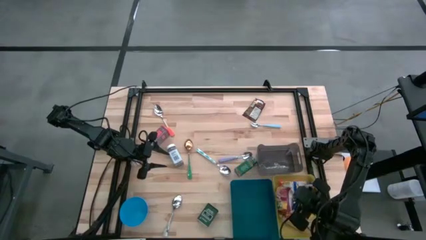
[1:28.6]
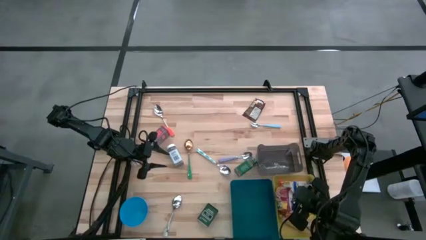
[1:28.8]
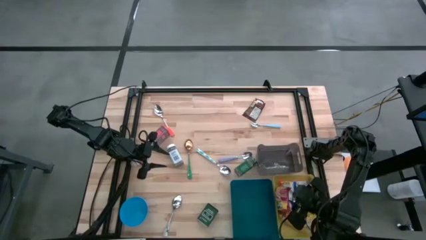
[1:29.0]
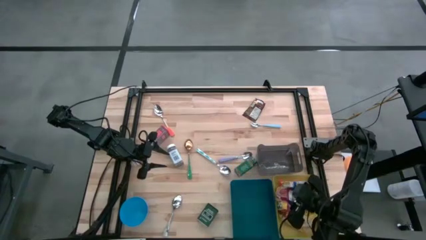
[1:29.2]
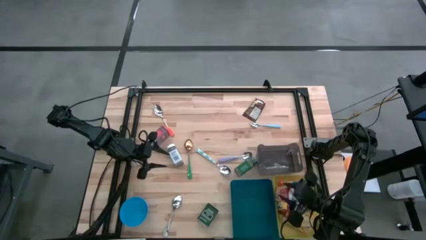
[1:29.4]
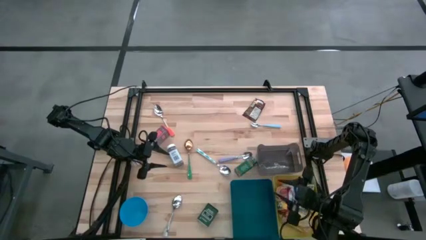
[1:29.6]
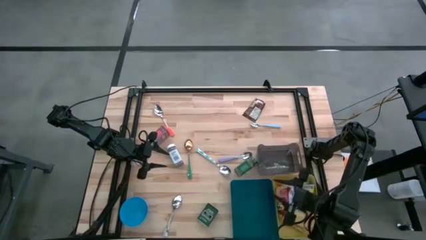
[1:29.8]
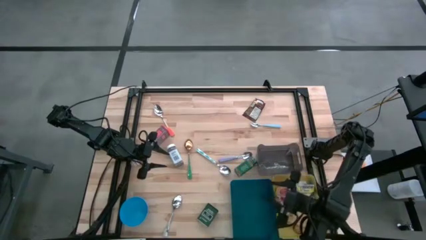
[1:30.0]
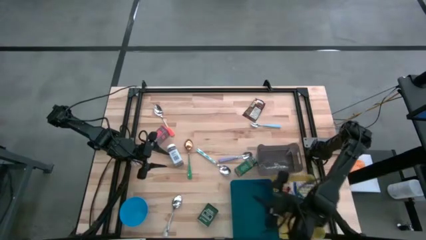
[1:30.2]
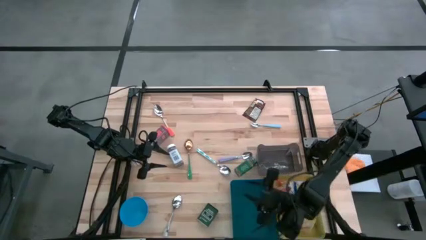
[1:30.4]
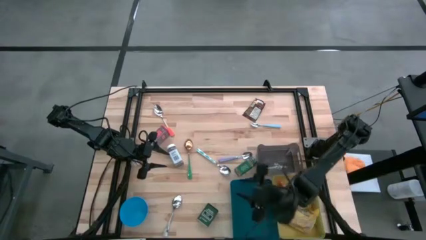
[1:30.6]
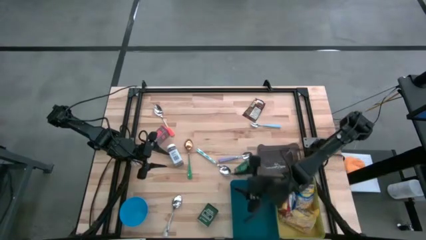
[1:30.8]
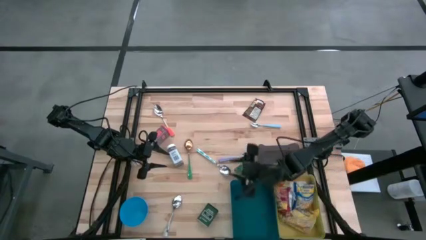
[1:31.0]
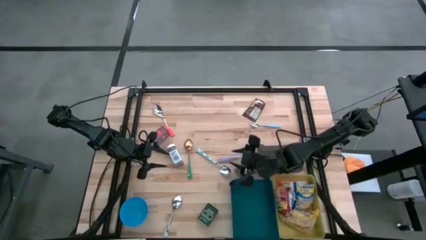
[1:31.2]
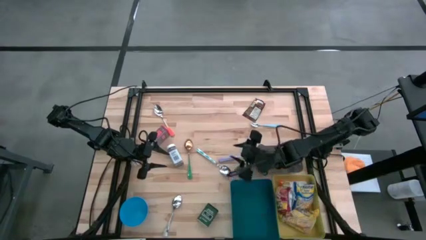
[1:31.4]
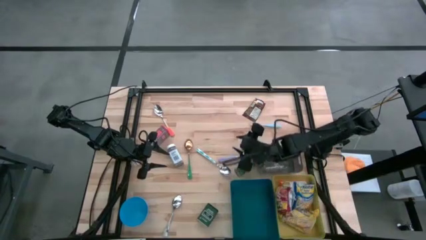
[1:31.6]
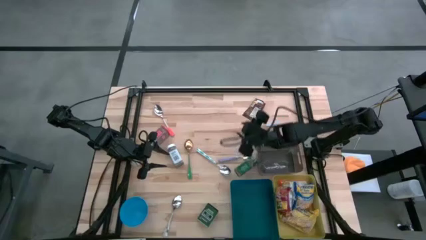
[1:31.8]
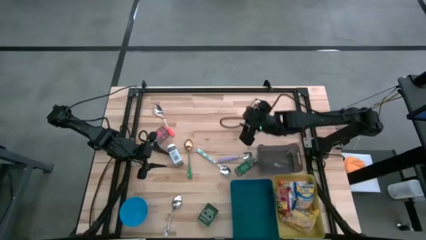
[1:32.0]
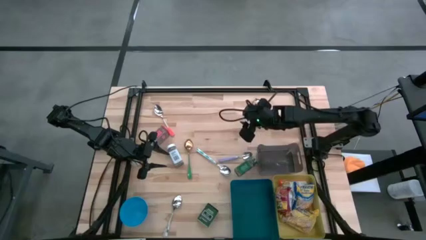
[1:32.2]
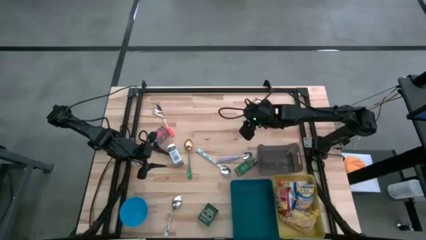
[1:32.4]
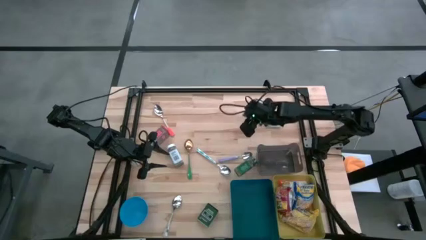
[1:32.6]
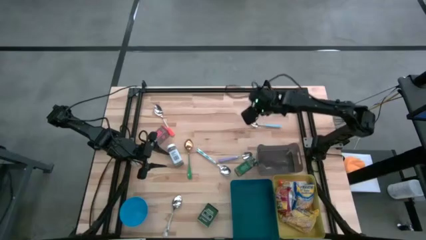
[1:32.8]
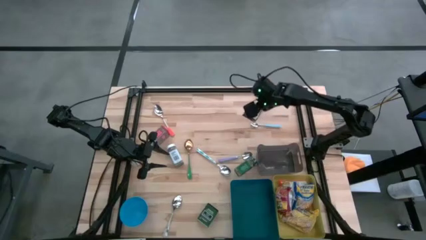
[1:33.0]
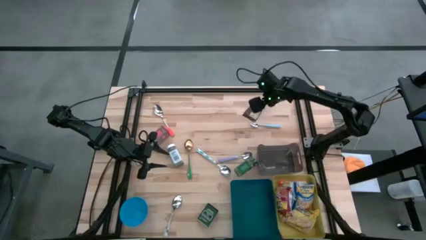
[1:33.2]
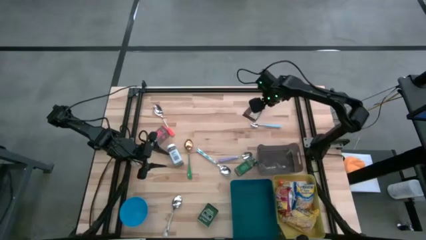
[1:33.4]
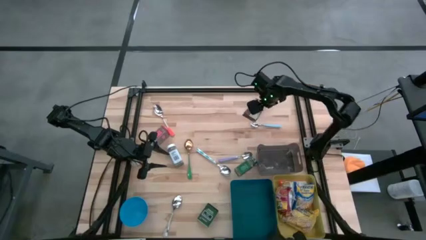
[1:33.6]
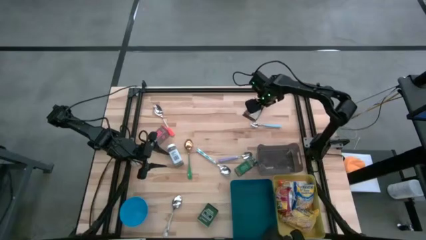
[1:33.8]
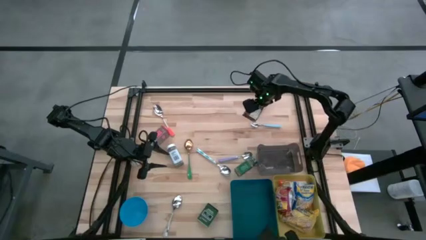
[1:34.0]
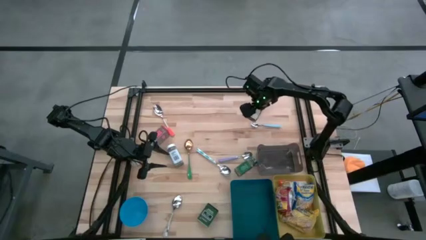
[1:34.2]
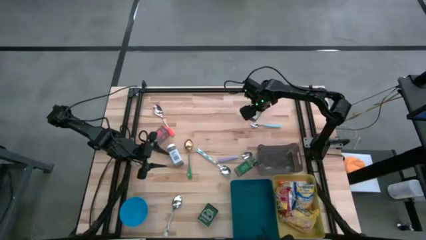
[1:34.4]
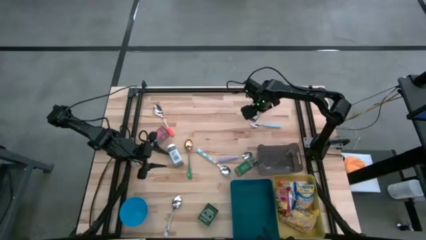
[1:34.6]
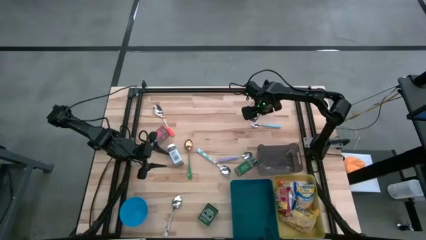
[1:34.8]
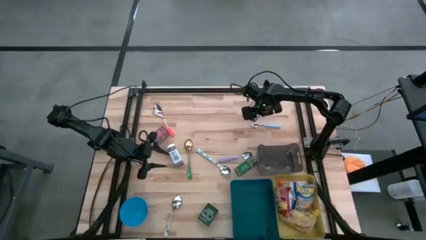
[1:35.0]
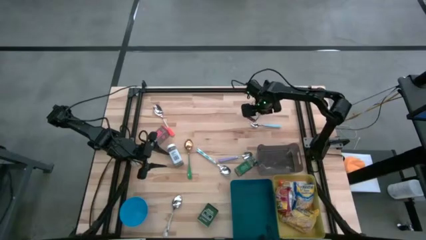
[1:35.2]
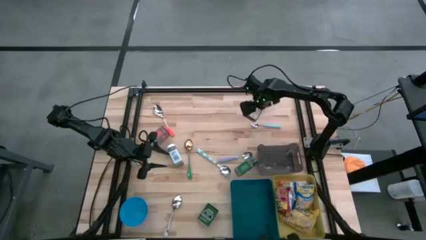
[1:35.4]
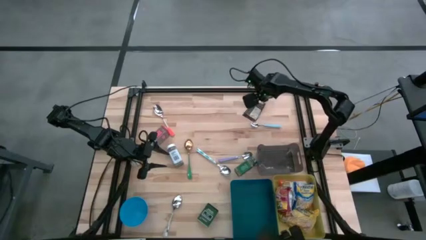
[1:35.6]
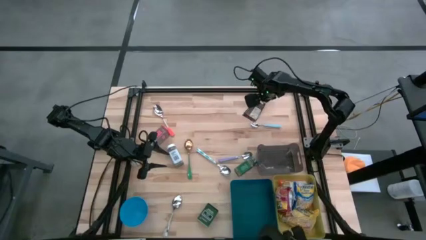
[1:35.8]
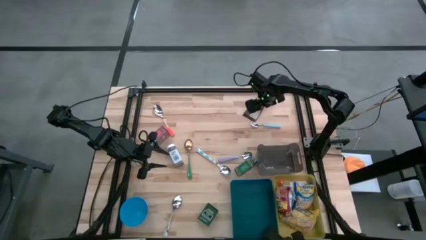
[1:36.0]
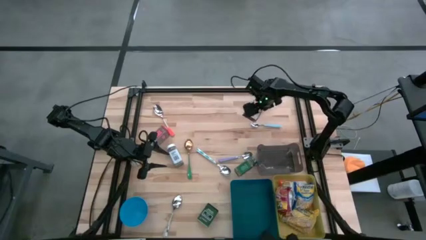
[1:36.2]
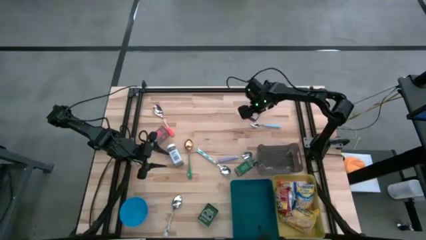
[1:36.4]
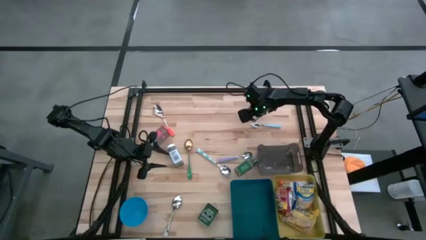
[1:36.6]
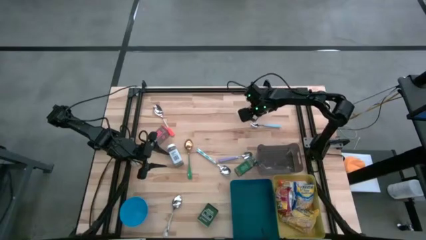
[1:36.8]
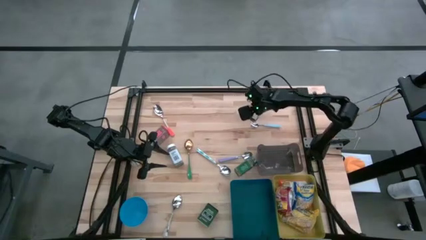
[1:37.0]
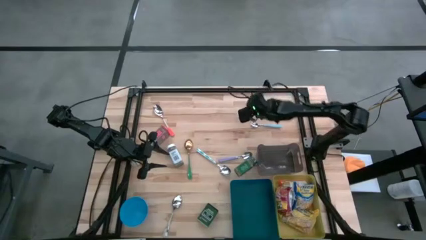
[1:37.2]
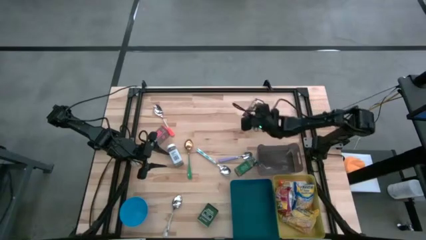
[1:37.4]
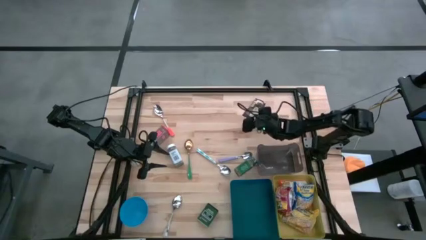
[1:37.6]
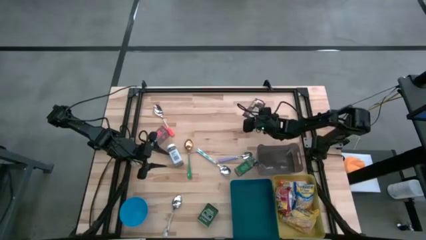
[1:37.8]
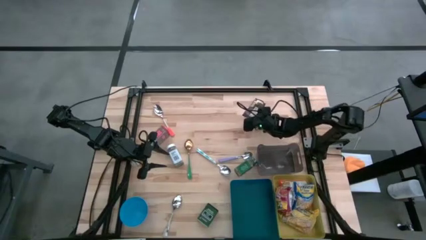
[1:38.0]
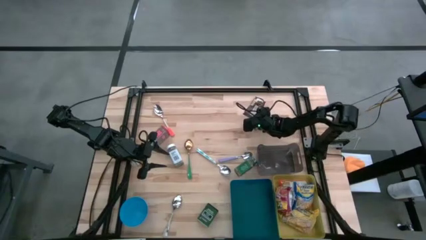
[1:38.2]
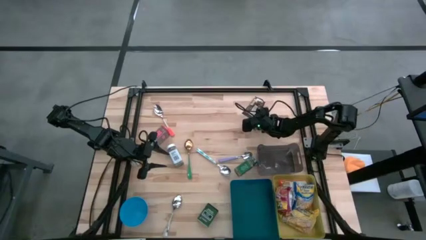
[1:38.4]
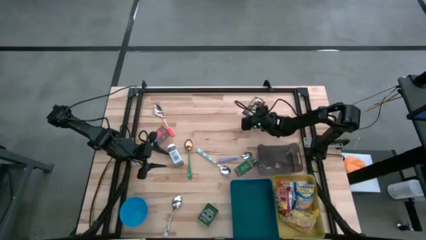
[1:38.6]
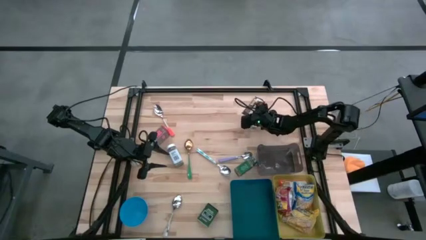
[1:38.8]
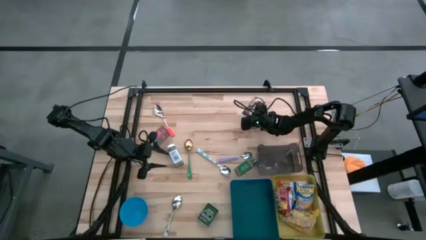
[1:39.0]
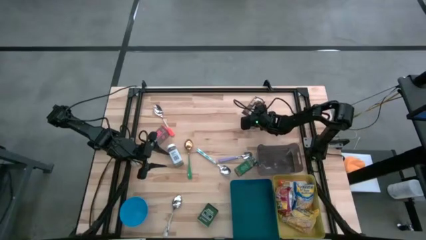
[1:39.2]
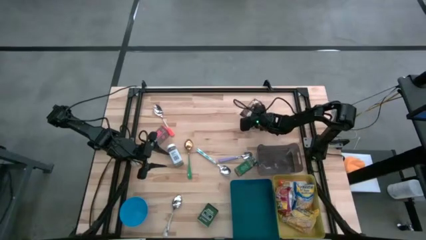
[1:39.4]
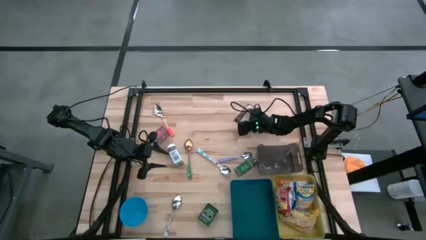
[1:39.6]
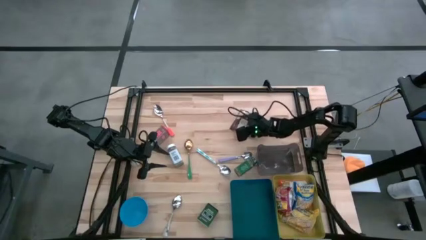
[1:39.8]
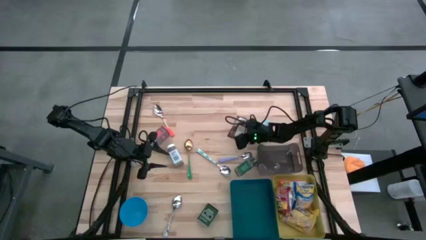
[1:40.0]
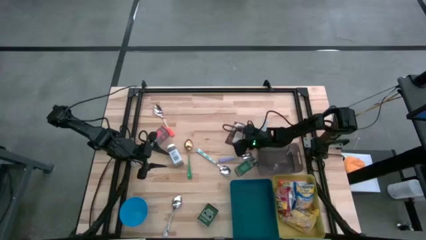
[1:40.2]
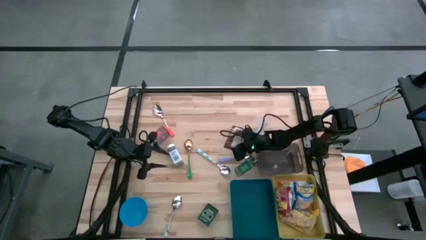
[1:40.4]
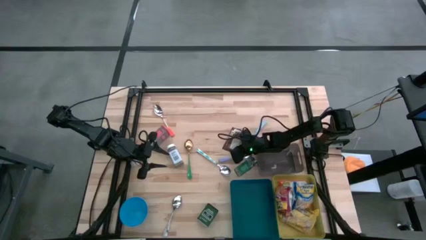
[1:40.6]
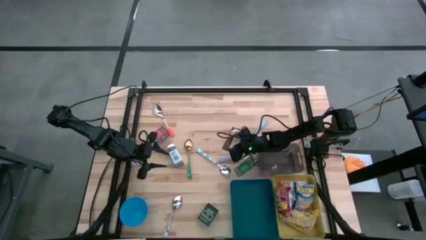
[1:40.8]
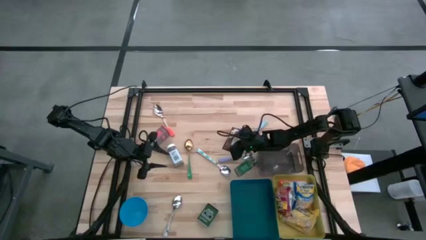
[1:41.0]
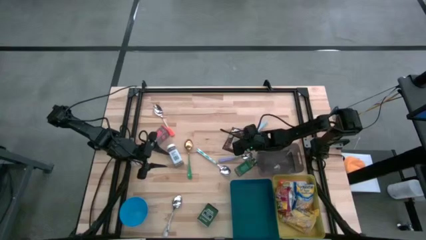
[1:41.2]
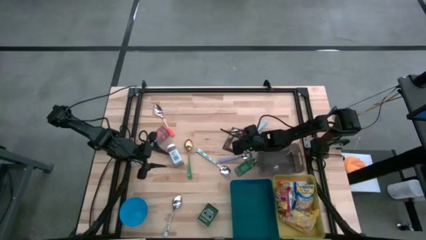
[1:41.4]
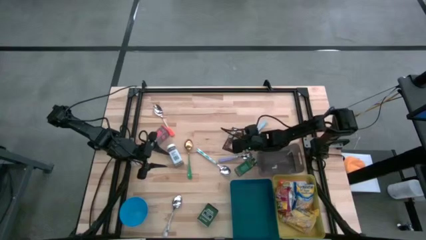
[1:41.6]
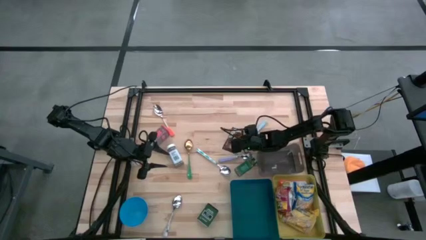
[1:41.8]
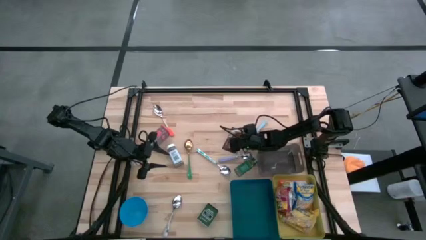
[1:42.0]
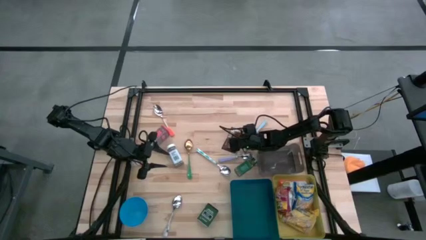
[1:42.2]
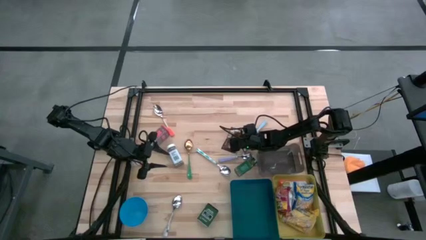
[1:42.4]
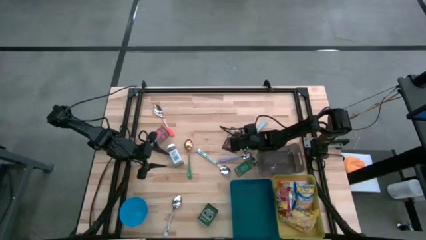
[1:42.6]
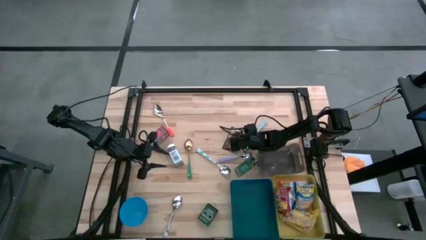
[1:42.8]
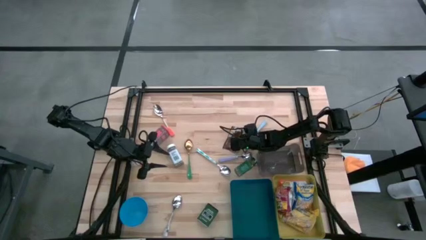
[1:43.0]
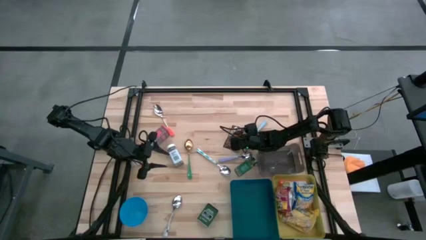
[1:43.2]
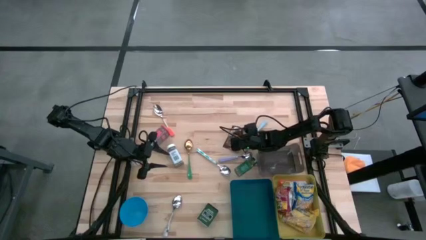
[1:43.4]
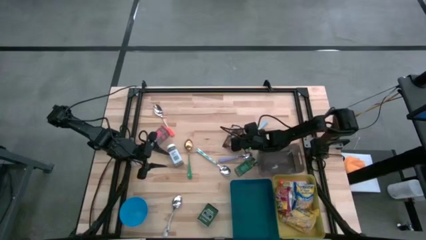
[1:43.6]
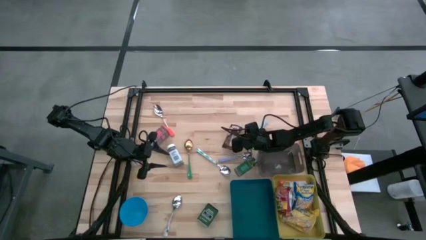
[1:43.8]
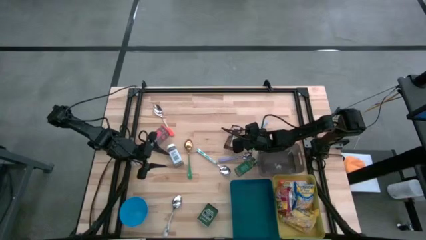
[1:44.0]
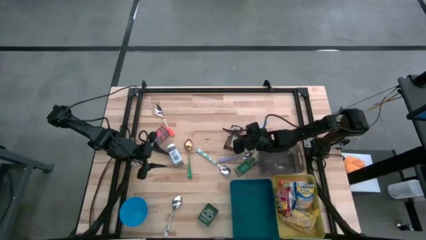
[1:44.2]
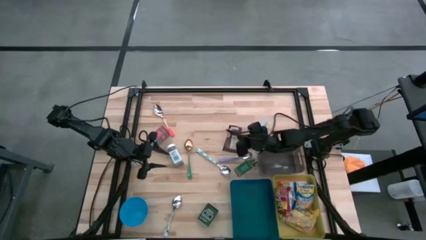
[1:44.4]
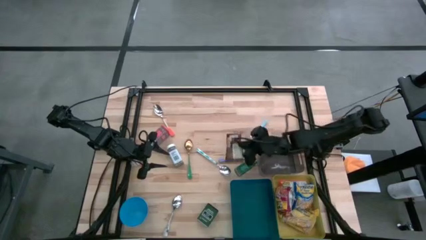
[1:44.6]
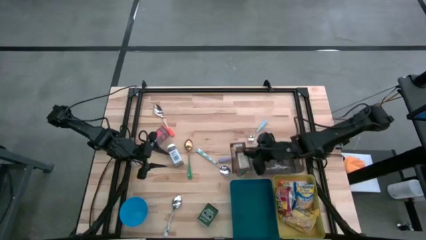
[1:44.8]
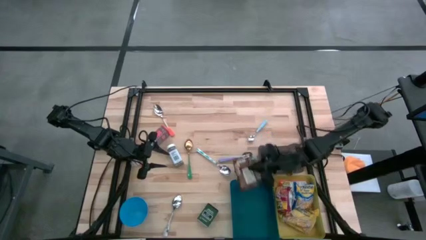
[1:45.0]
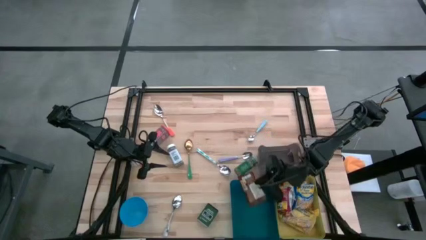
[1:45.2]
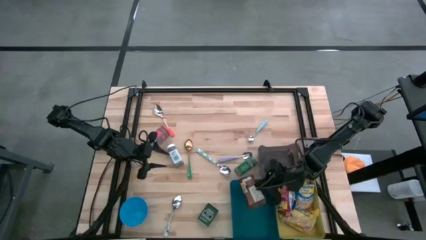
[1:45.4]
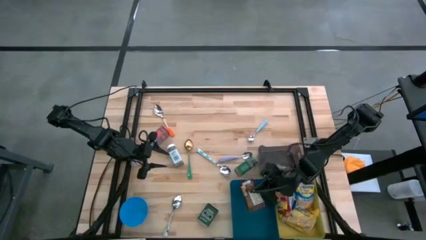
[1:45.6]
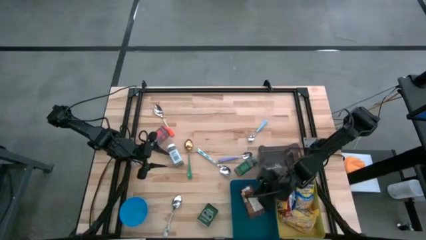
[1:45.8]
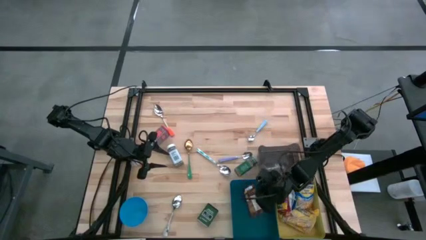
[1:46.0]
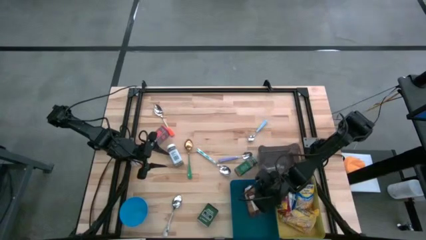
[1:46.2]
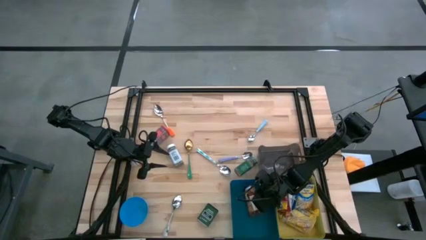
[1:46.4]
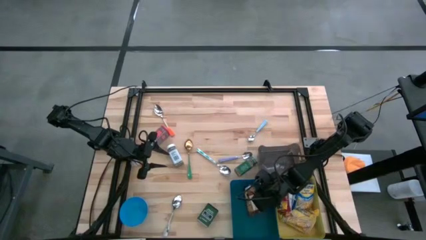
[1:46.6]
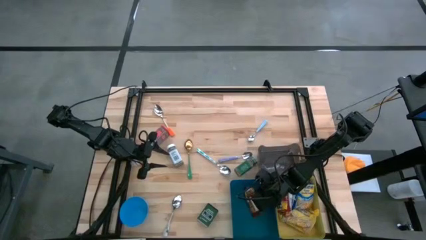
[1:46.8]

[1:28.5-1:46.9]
Put the orange seasoning pack into the blue bin
